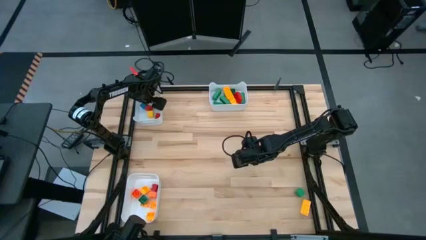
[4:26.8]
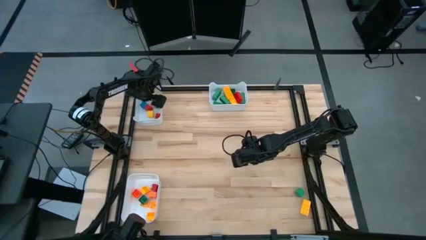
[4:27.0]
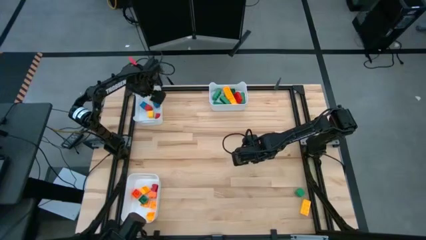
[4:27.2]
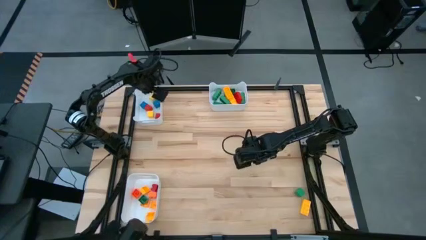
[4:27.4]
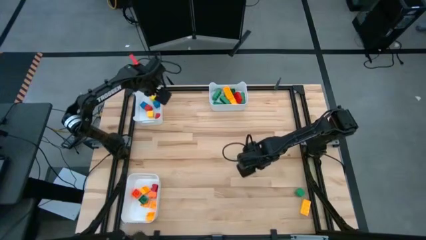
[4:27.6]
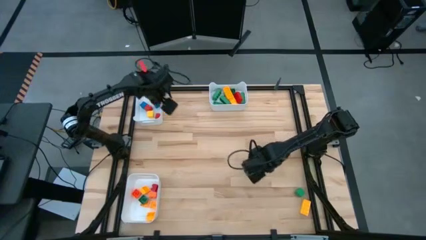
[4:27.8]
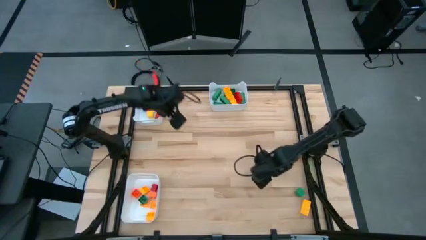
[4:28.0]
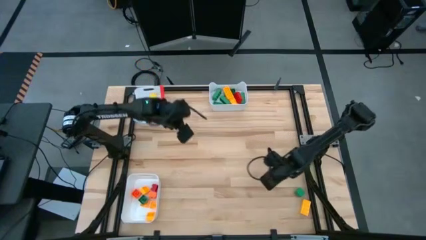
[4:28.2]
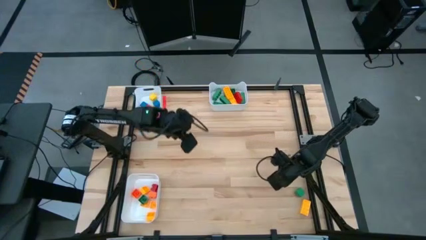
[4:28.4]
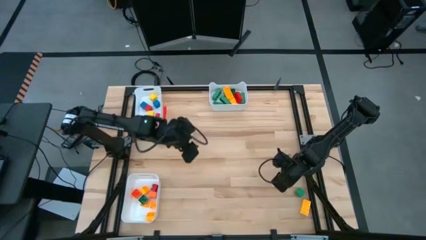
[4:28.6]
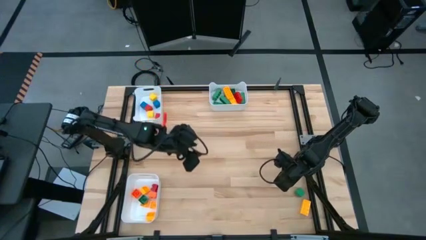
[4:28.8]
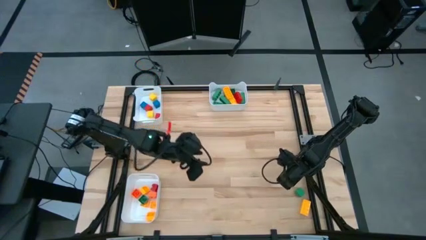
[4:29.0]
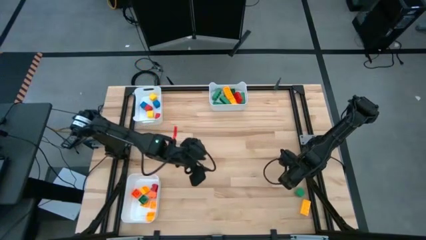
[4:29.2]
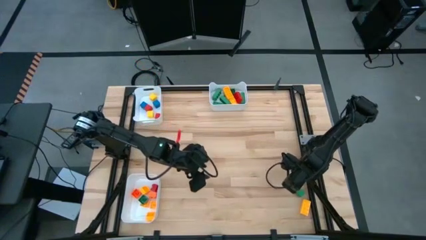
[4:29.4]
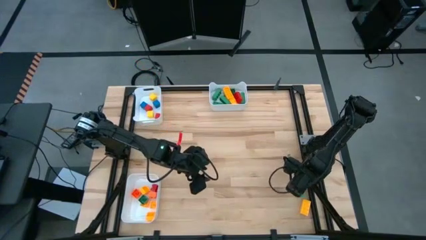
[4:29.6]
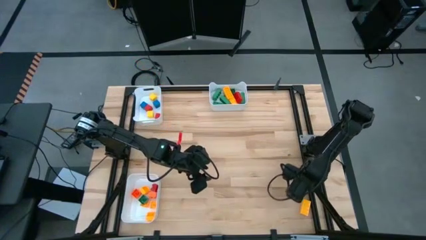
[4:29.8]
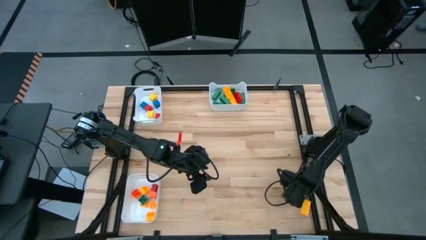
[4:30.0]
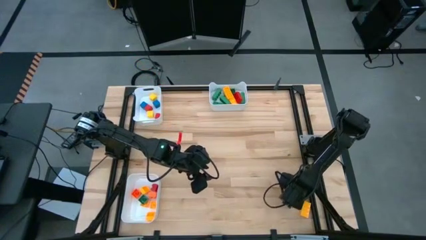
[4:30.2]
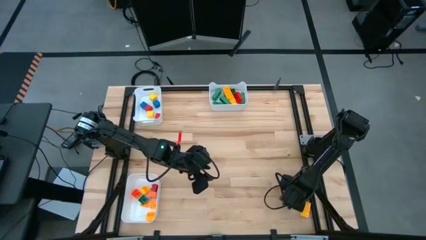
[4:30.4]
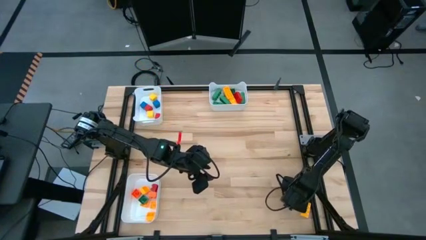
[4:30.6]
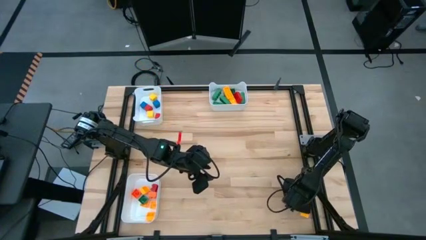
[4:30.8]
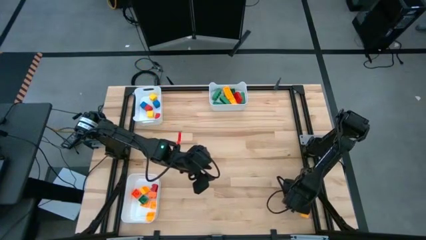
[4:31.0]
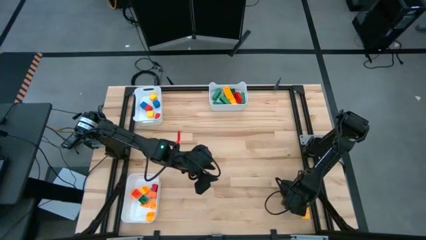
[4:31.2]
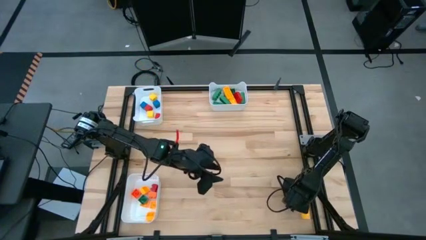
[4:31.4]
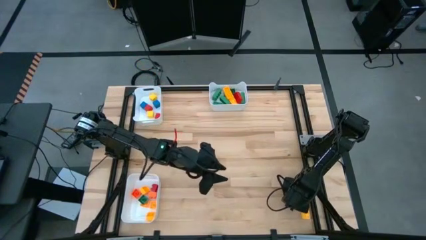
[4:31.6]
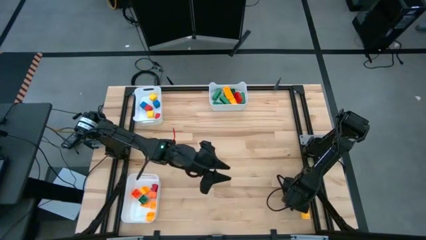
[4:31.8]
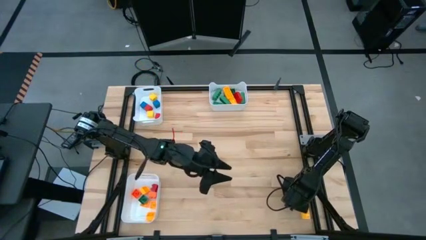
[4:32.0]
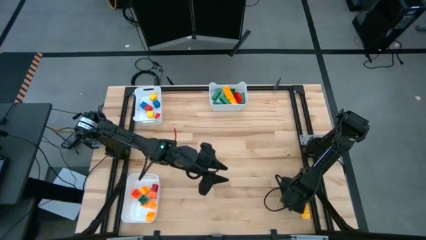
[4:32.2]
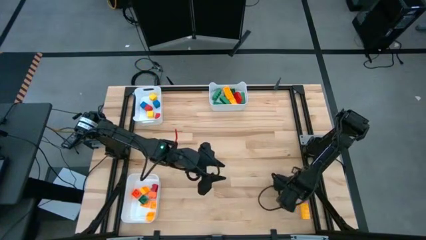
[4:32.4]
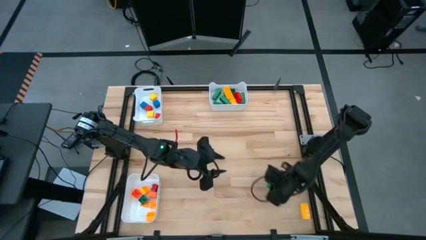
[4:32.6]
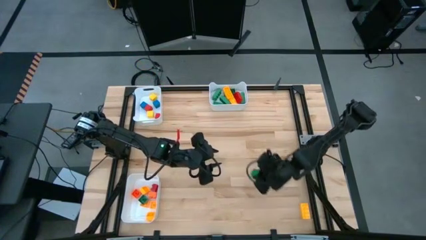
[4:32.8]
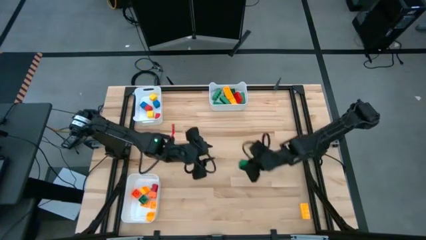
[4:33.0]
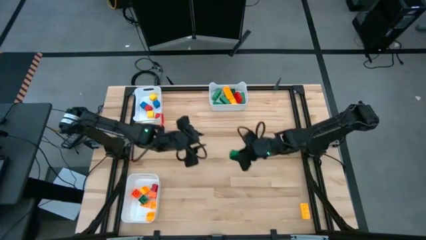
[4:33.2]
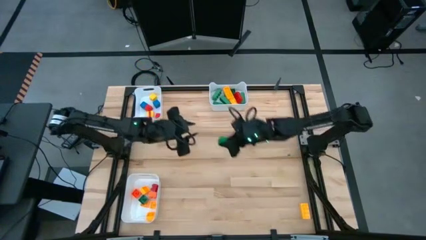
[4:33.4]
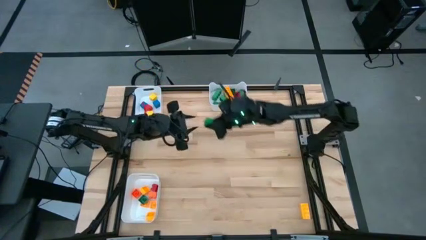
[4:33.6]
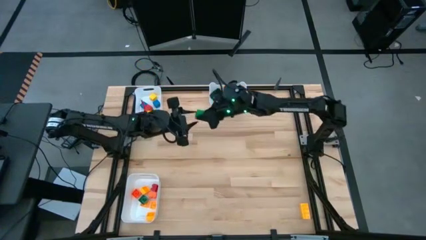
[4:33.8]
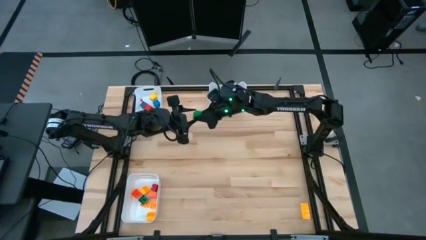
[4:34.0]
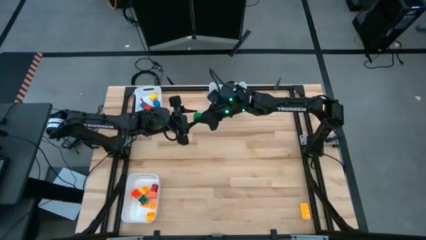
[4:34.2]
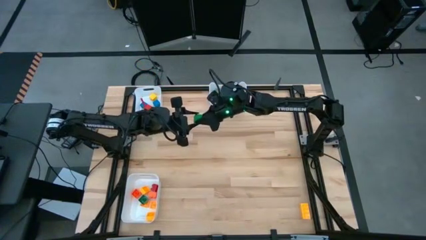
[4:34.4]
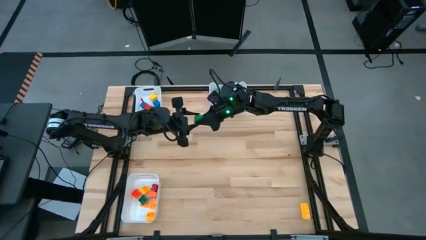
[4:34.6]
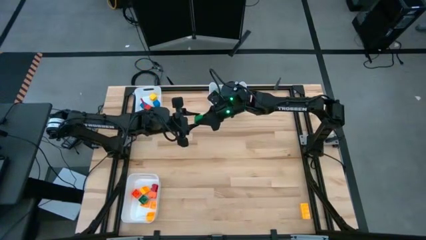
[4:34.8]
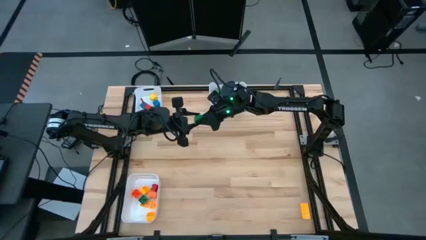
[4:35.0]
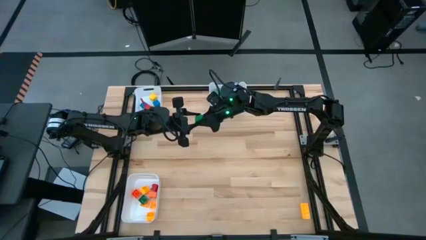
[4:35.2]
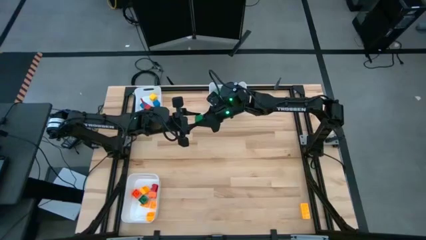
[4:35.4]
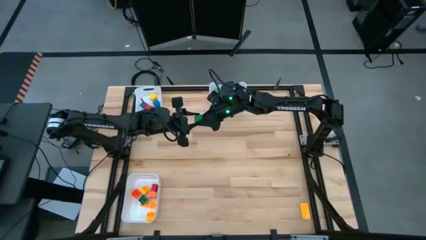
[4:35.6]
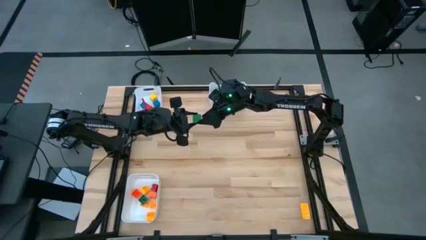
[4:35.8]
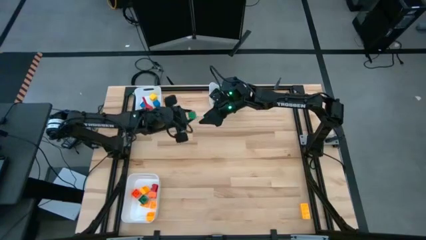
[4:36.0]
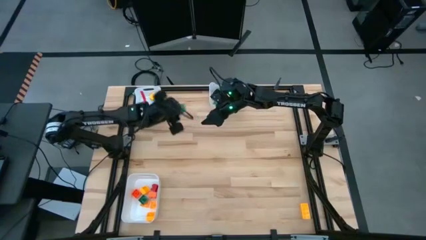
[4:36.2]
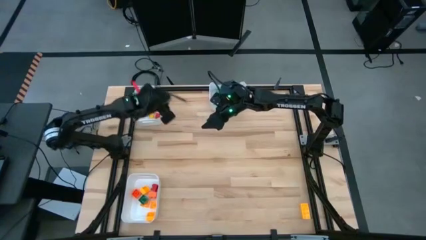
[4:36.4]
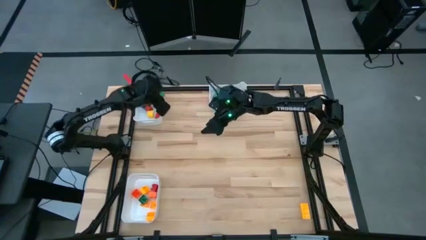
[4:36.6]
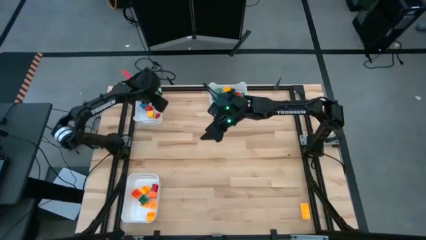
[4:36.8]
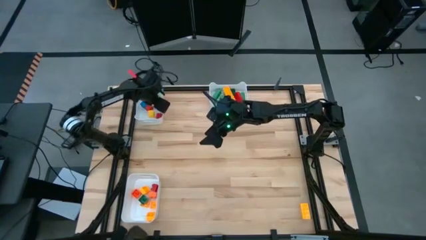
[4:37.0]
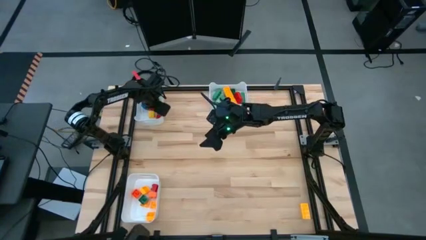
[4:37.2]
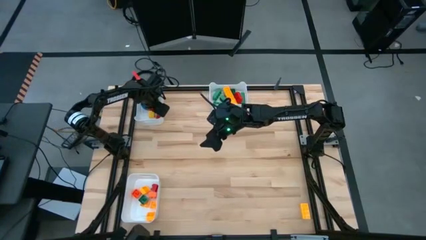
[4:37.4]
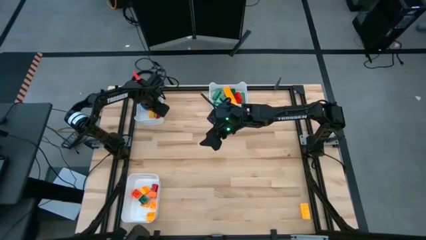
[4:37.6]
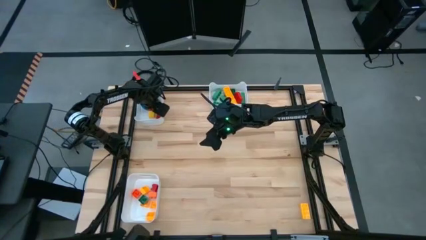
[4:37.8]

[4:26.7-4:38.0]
Task: Sort blocks by size
Put the green block into the top left white bin

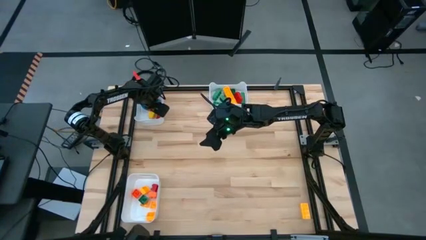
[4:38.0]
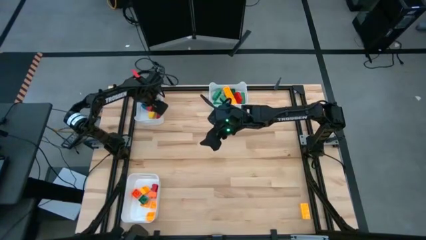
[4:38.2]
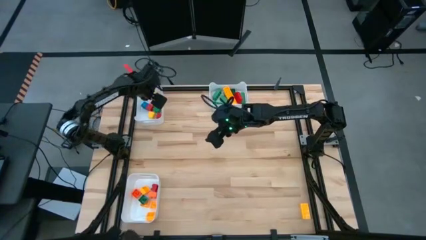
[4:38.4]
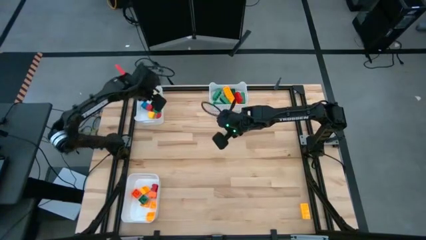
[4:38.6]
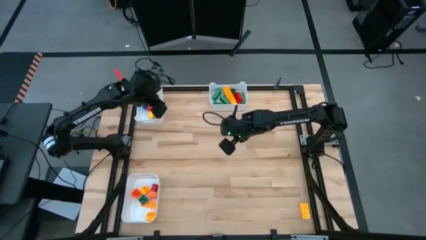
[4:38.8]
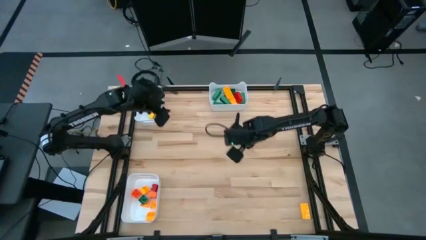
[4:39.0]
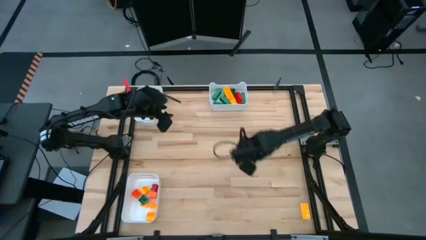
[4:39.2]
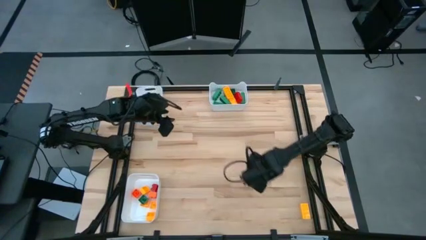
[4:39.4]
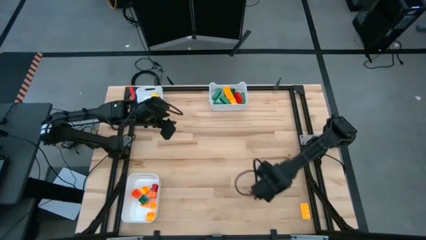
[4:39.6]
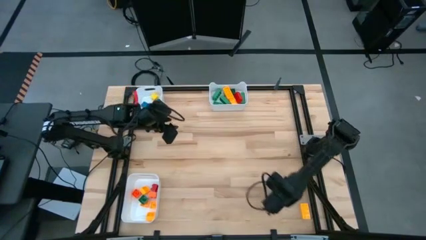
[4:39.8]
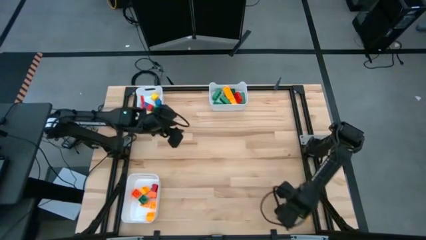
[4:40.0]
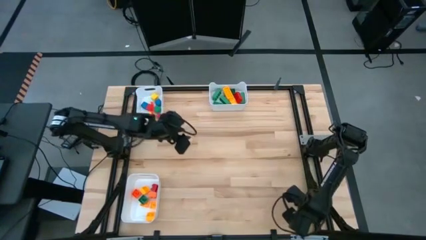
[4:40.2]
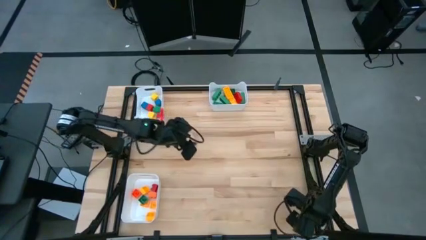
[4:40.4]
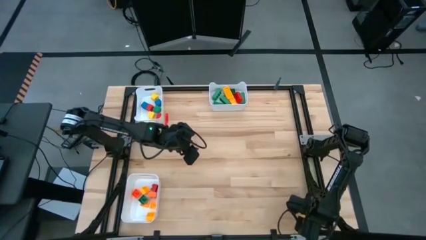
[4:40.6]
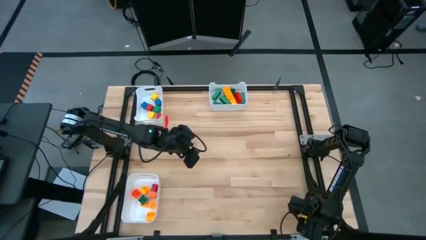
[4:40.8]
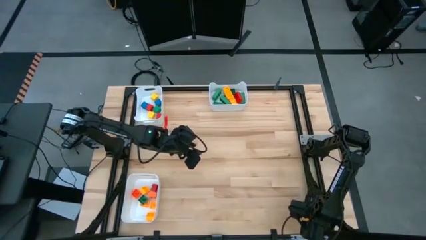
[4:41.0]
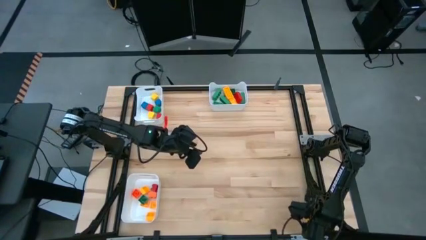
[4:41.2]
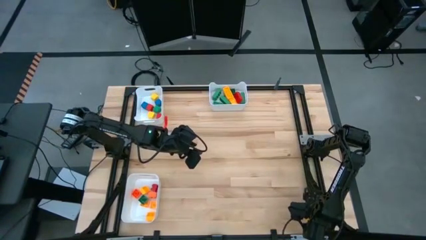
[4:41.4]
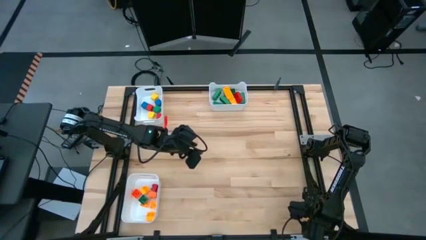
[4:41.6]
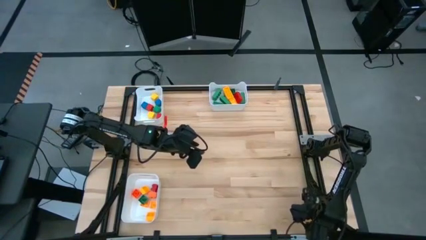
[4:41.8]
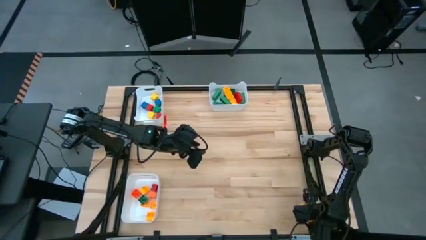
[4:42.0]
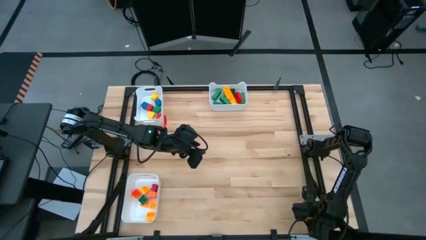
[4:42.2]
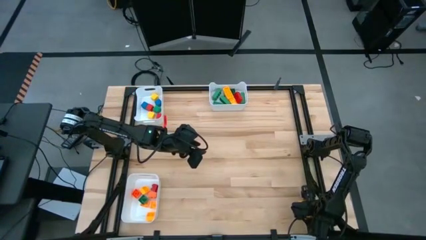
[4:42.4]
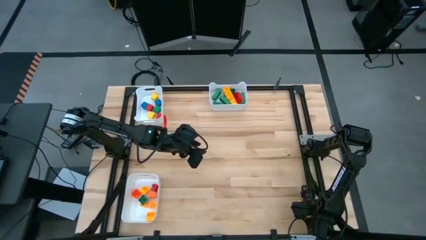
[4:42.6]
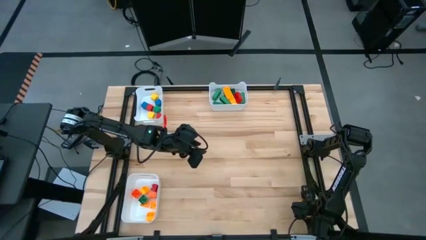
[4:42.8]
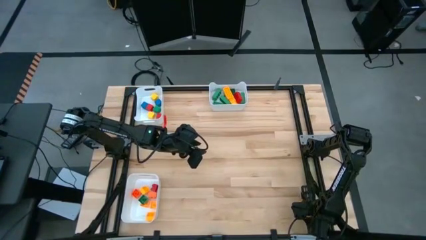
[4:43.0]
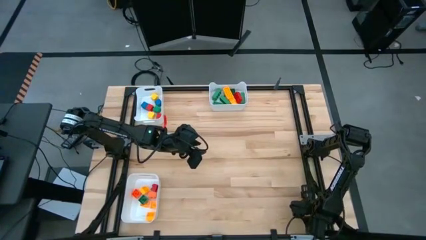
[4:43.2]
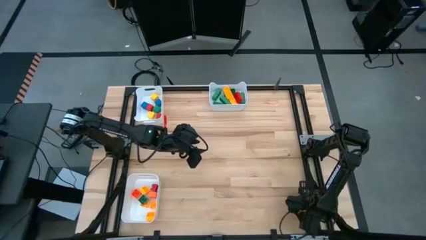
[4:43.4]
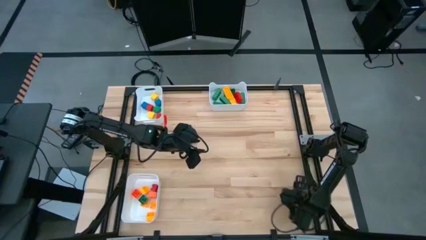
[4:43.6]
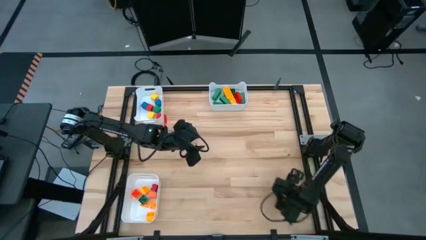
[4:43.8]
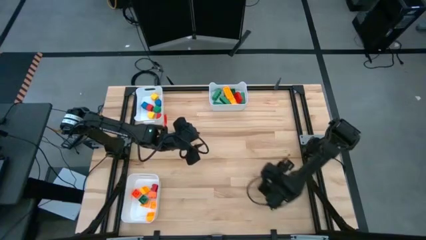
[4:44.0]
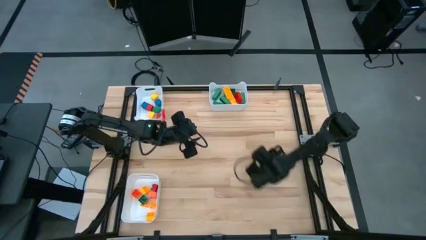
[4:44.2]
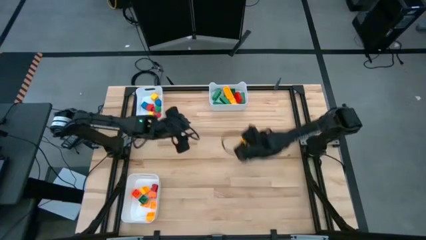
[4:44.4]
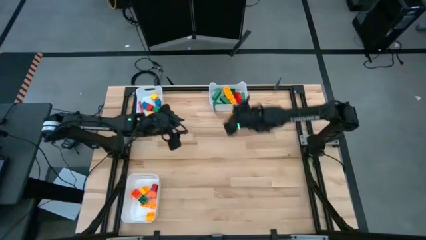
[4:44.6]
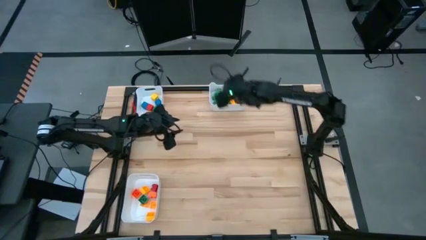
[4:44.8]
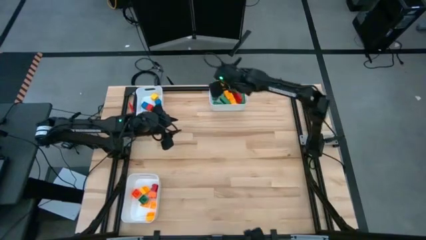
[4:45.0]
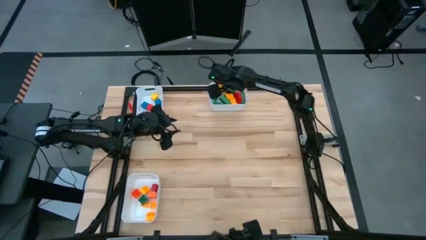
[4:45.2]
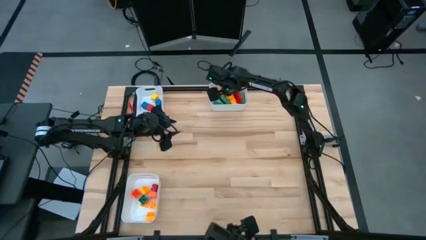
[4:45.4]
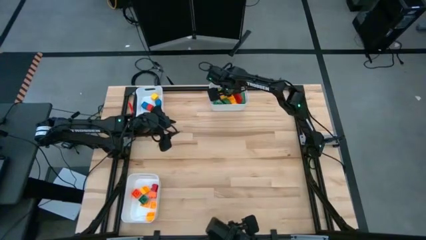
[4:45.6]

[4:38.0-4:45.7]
Put the yellow 8 stud game piece into the top right white bin
